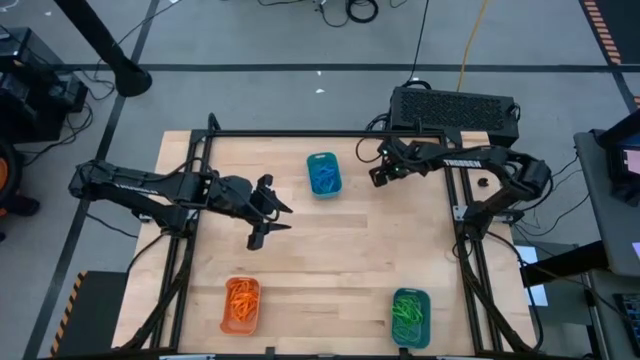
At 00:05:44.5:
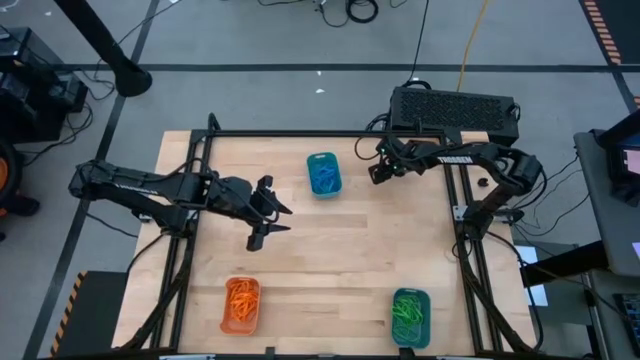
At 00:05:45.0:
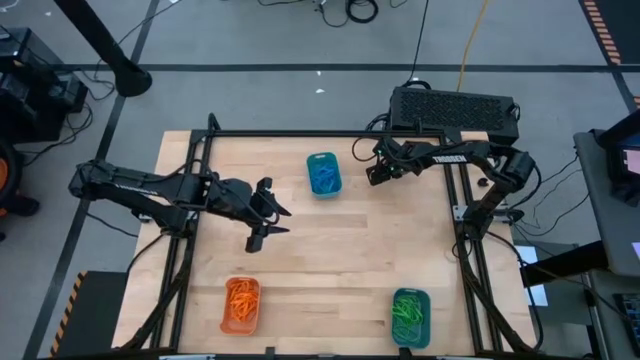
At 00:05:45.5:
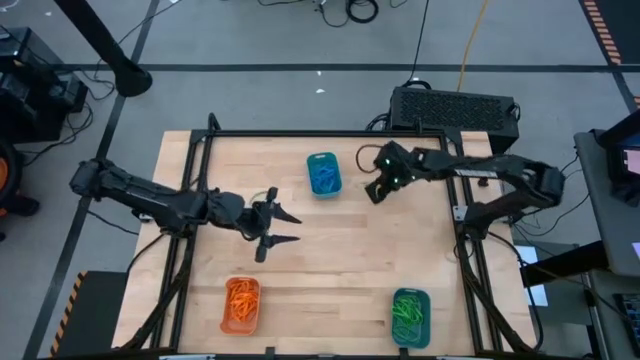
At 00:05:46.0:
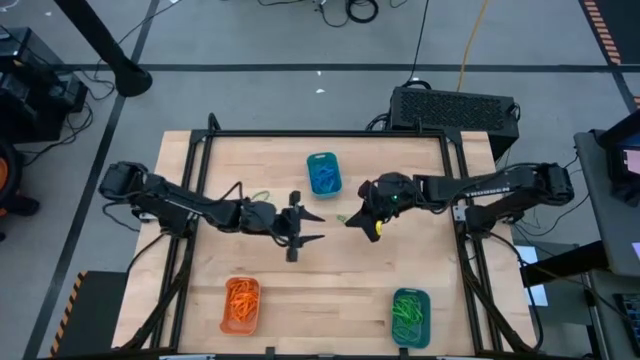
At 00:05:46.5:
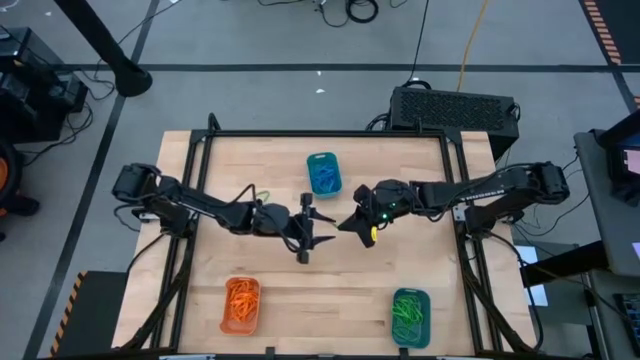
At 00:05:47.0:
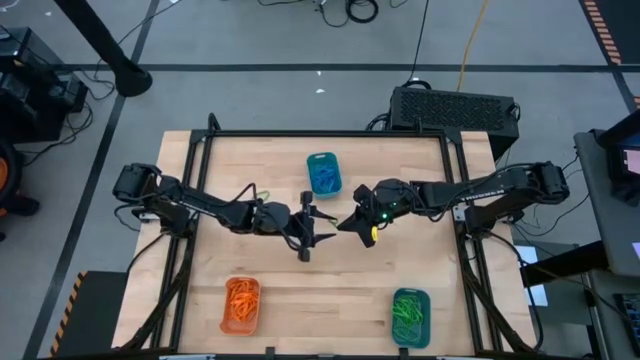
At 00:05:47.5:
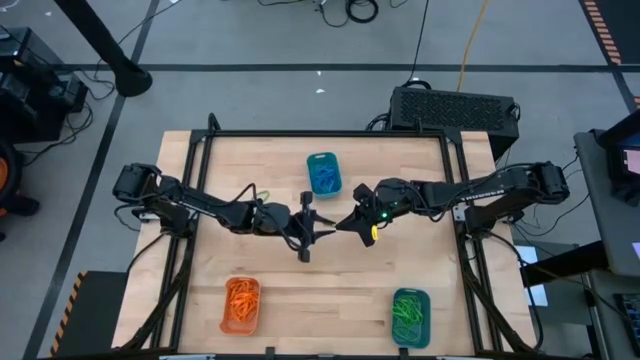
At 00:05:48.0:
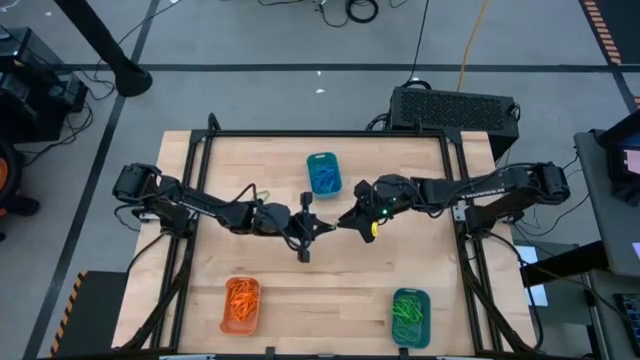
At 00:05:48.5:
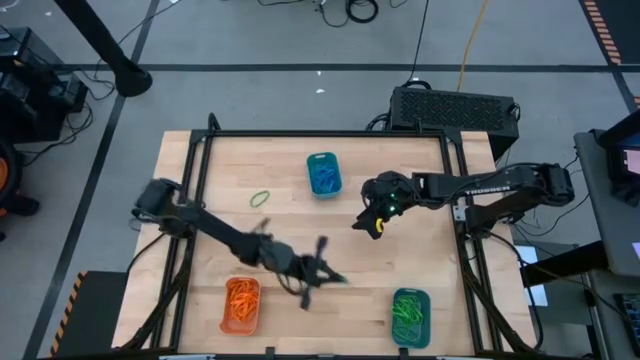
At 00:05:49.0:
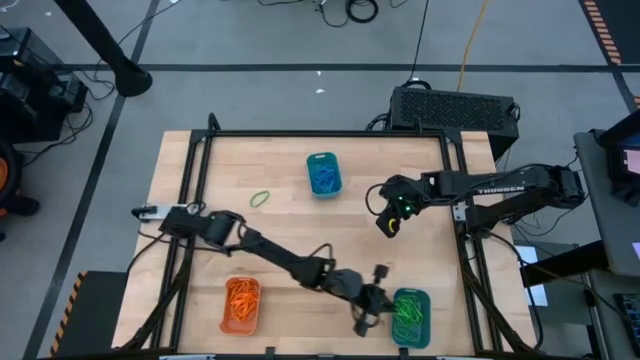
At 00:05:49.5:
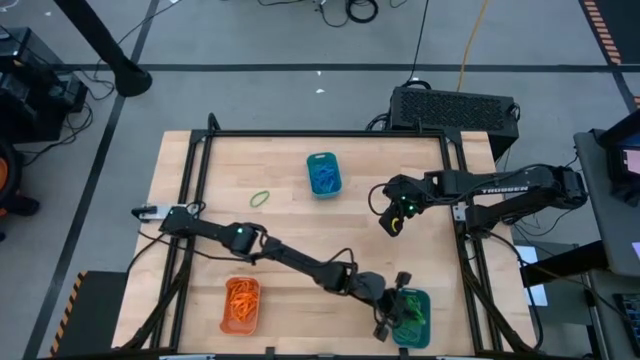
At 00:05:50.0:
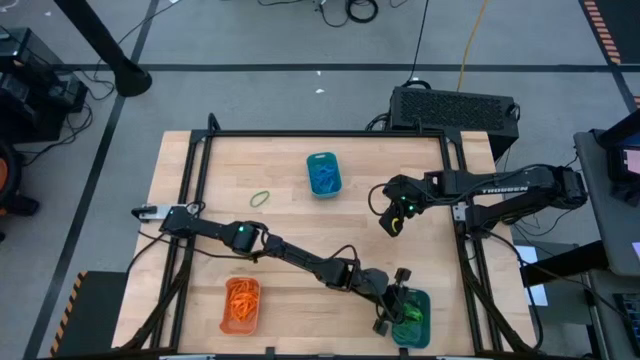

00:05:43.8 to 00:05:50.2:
Task: Sort rubber bands into baskets
Put the green rubber band into the bottom bin

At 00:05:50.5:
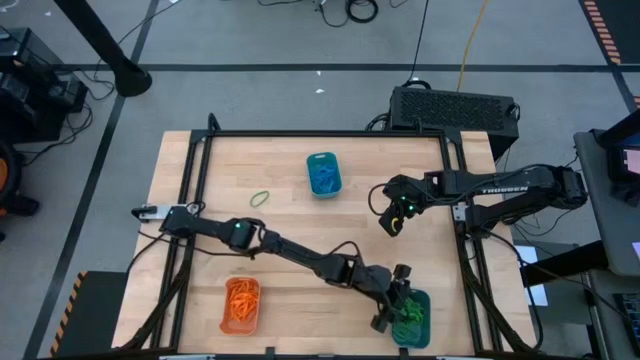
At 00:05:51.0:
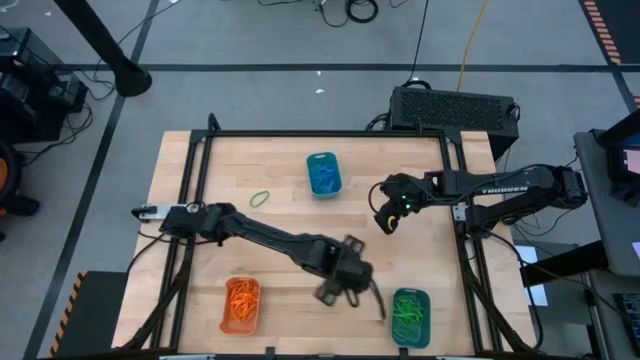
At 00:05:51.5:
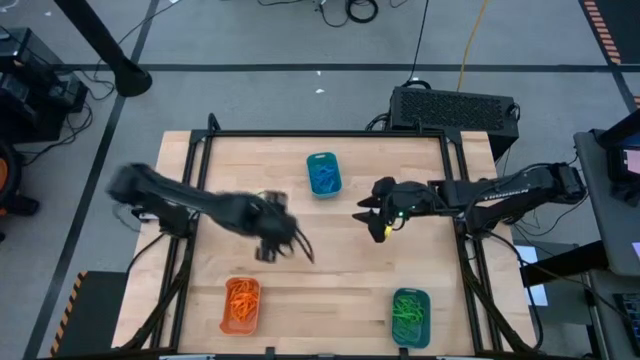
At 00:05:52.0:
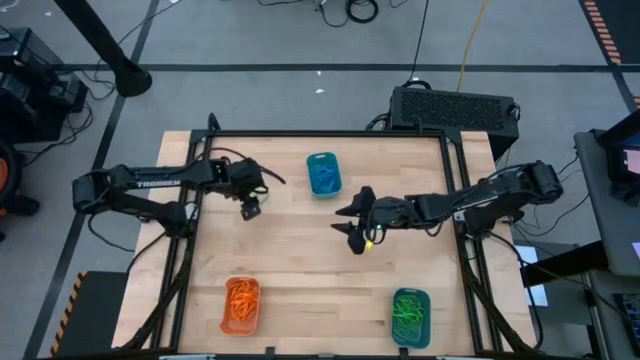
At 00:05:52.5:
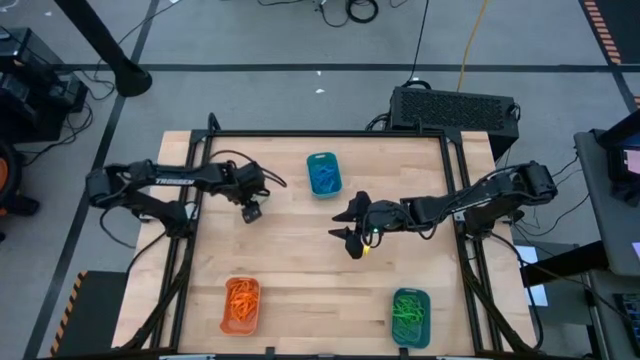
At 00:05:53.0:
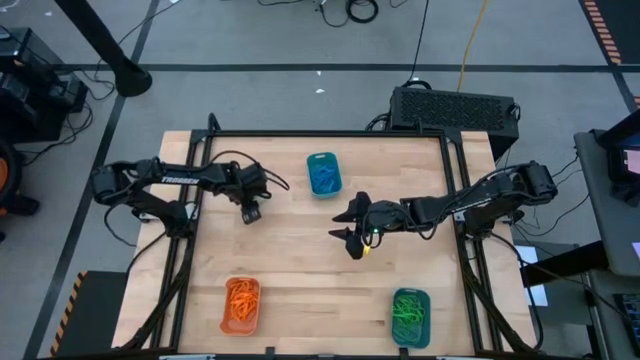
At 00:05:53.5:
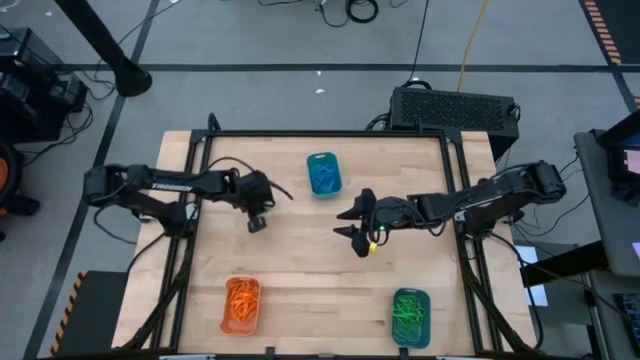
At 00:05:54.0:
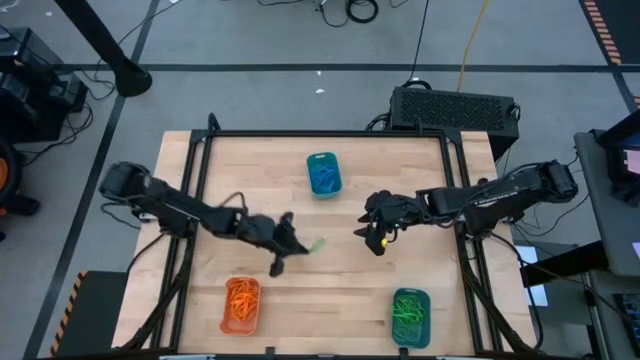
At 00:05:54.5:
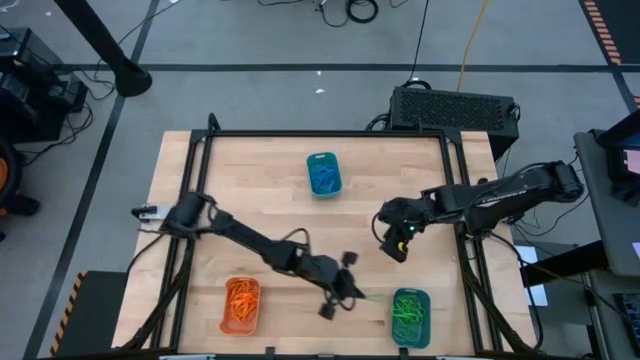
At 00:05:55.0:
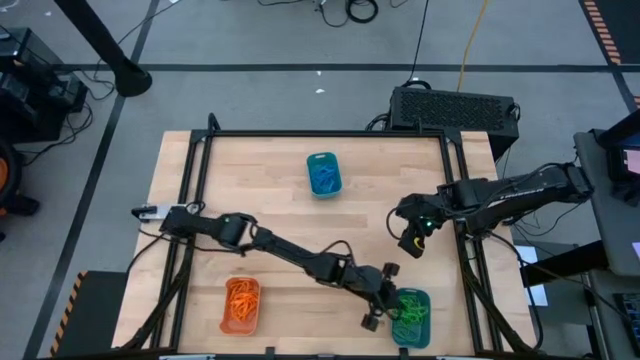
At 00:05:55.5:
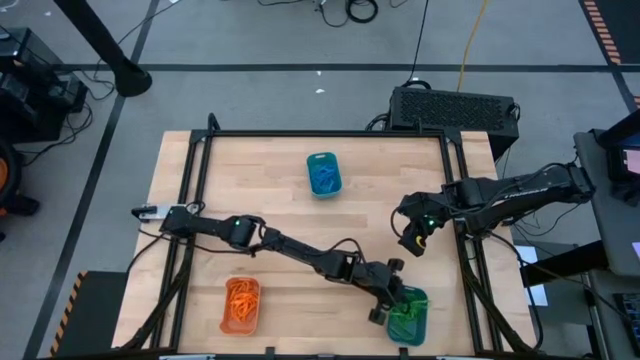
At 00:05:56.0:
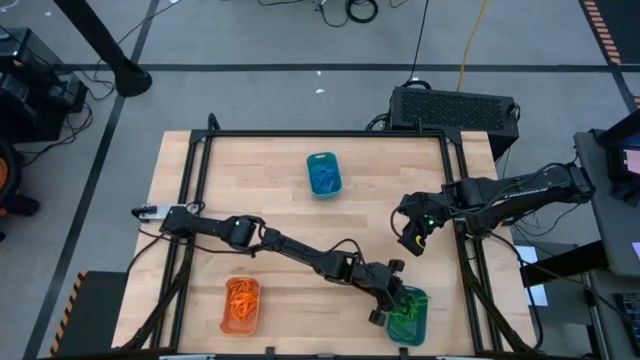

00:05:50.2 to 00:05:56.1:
Put the green rubber band into the bottom bin

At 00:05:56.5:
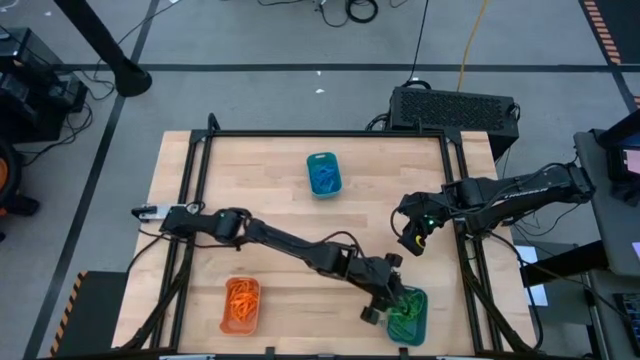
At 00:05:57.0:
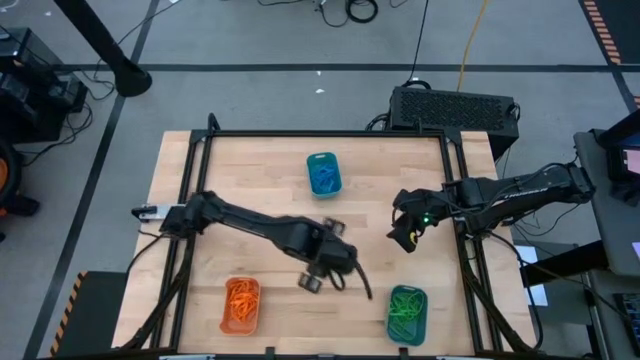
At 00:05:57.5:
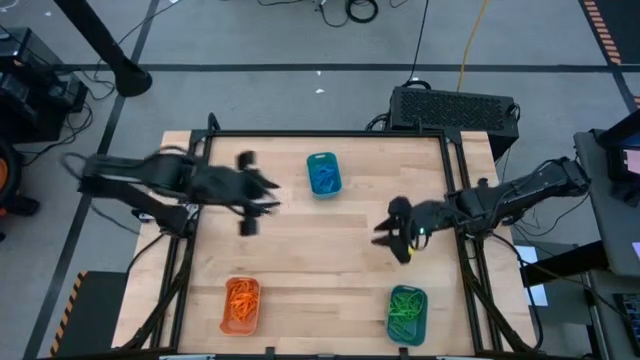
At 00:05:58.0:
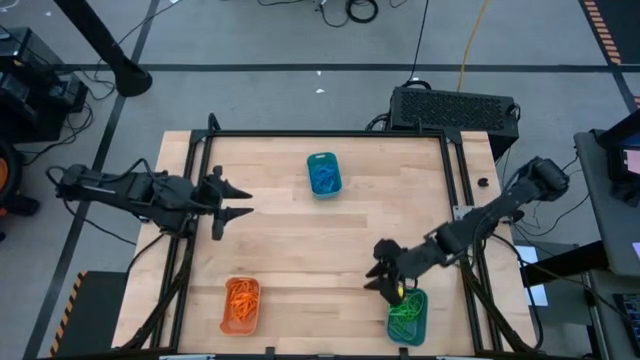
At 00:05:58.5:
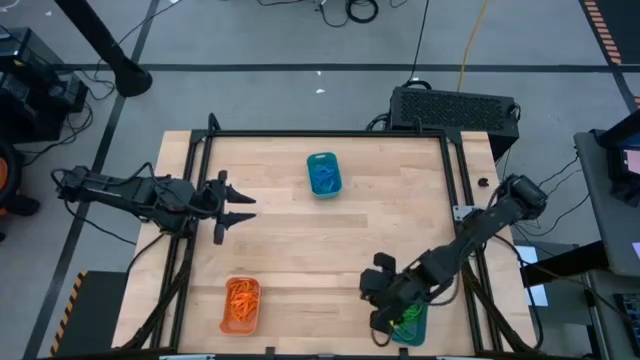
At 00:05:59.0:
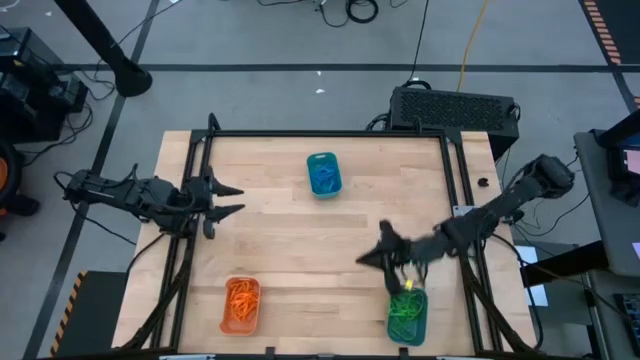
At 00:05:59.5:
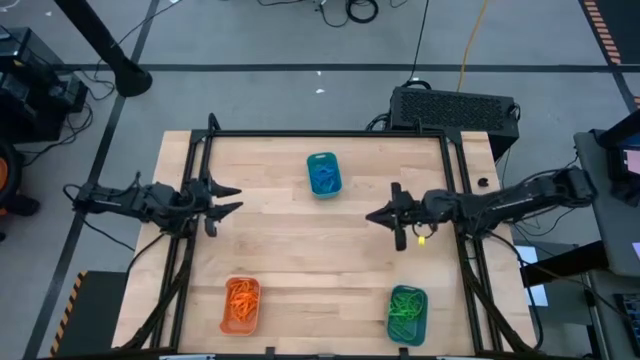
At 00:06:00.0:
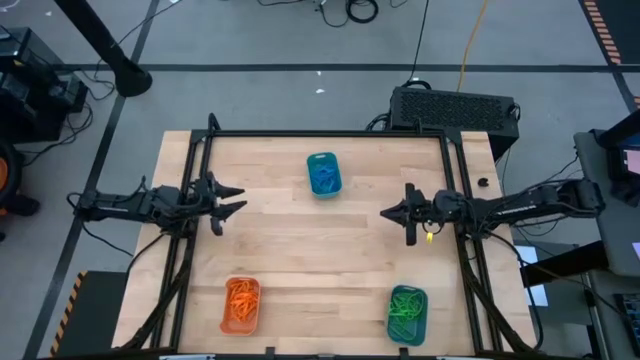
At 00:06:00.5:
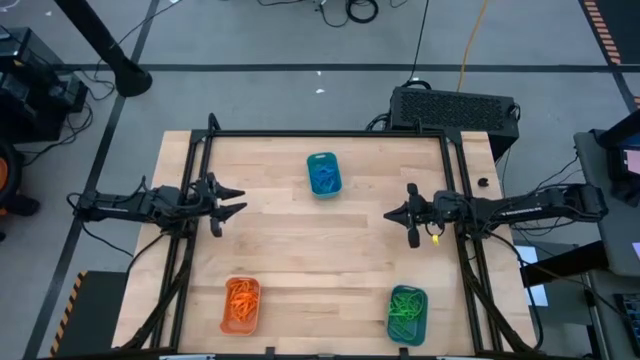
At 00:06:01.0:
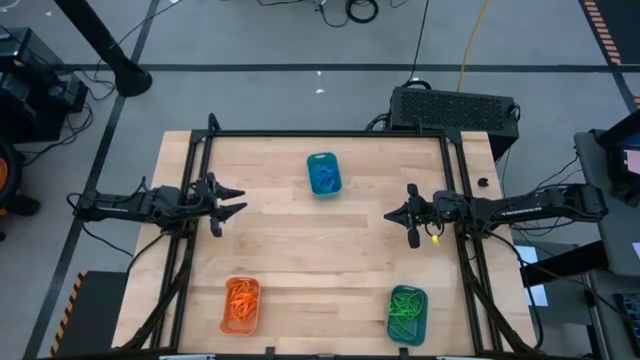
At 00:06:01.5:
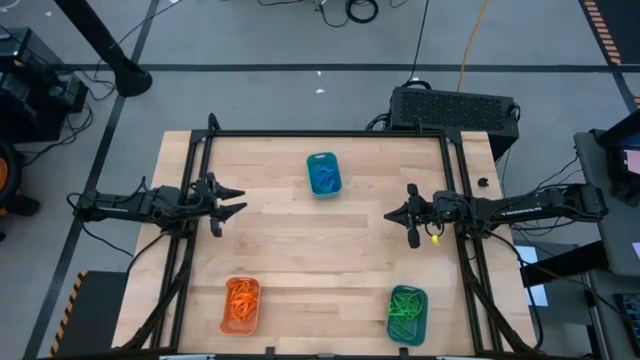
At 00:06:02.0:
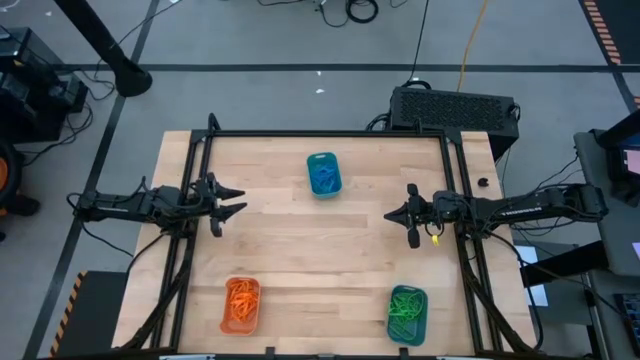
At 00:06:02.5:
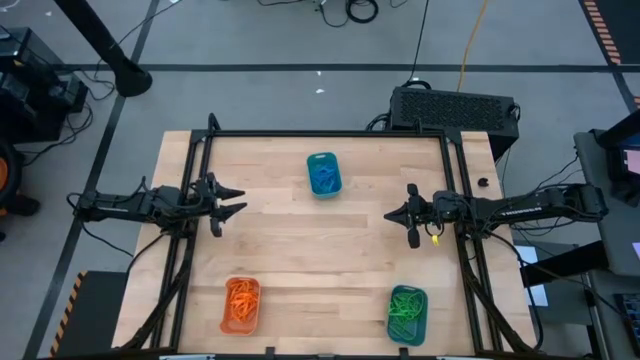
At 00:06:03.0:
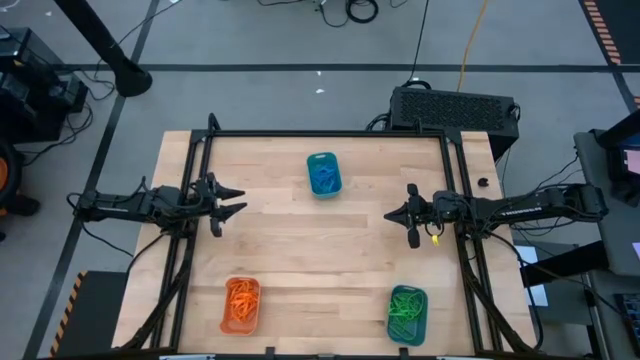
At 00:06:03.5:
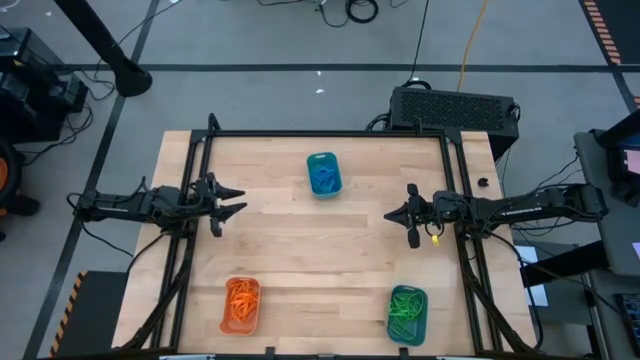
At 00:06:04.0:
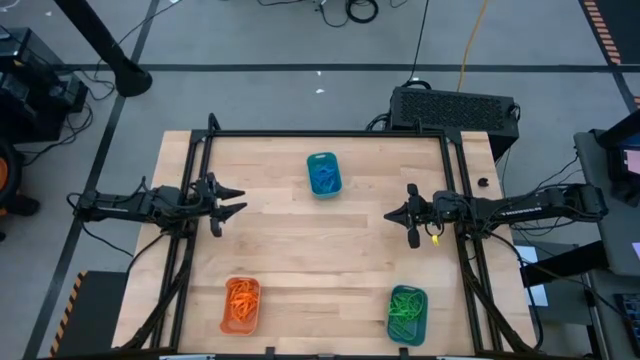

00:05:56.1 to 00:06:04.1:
Return to Home Position
